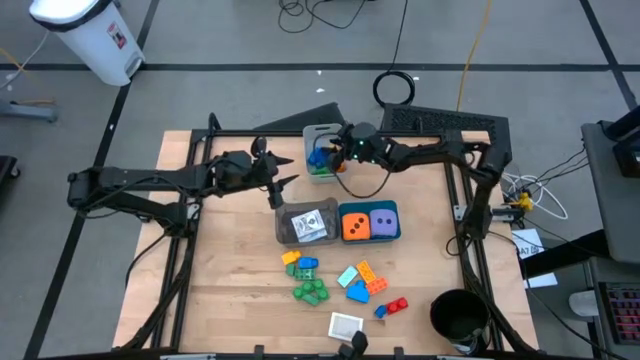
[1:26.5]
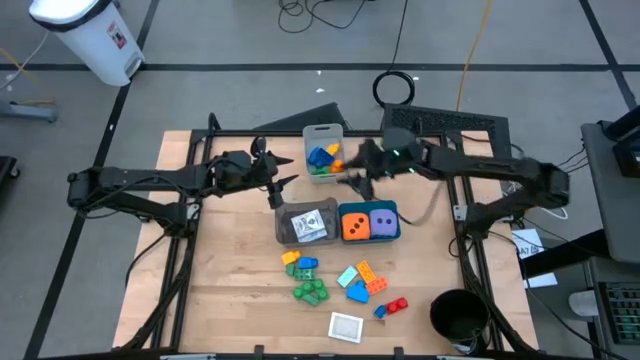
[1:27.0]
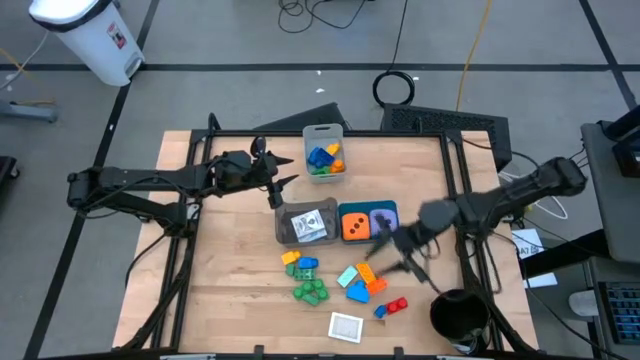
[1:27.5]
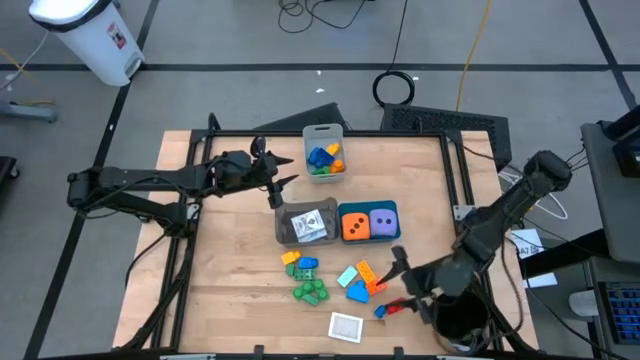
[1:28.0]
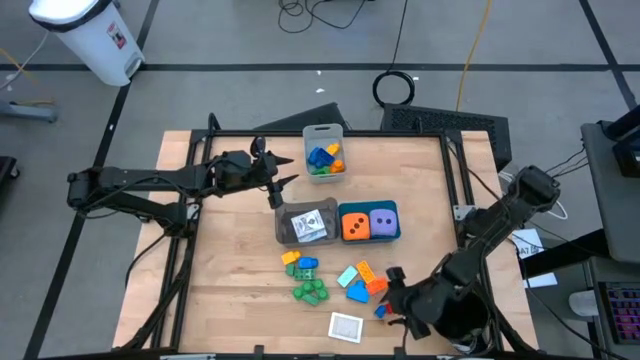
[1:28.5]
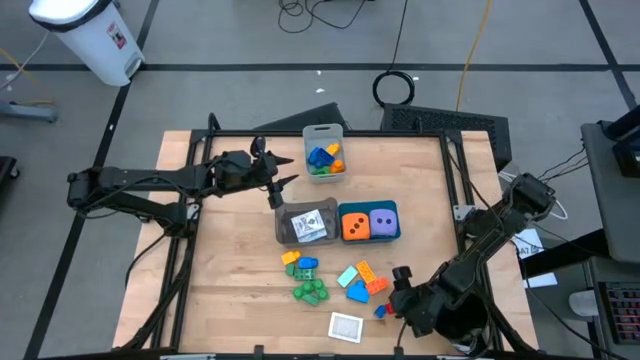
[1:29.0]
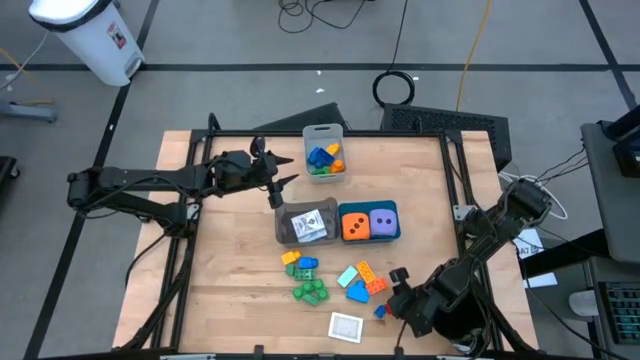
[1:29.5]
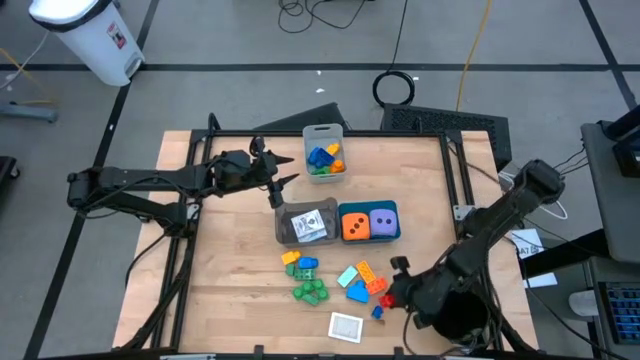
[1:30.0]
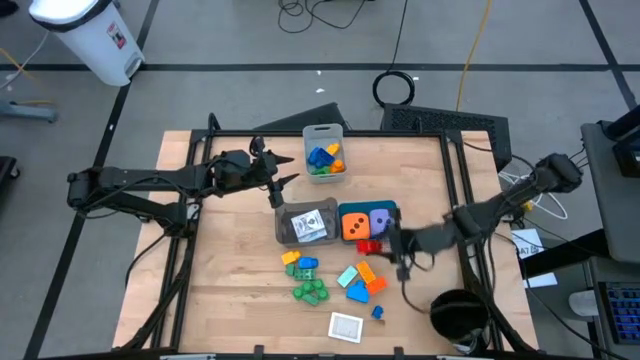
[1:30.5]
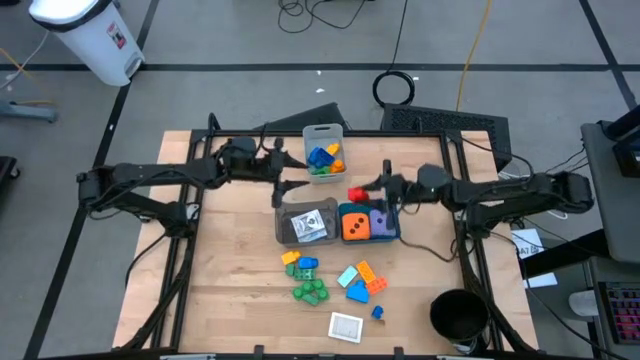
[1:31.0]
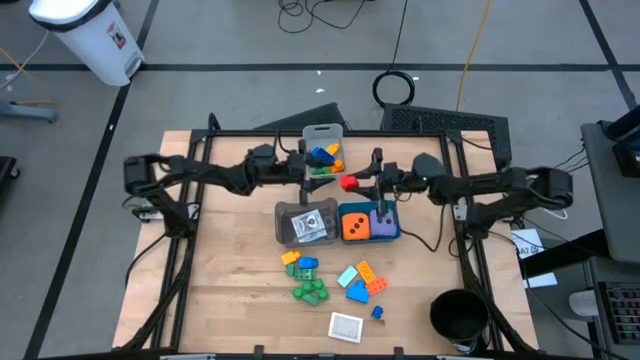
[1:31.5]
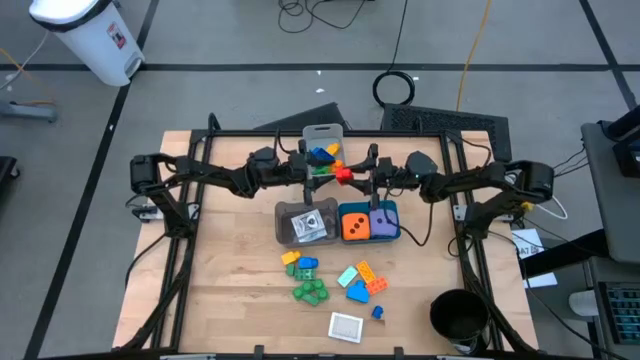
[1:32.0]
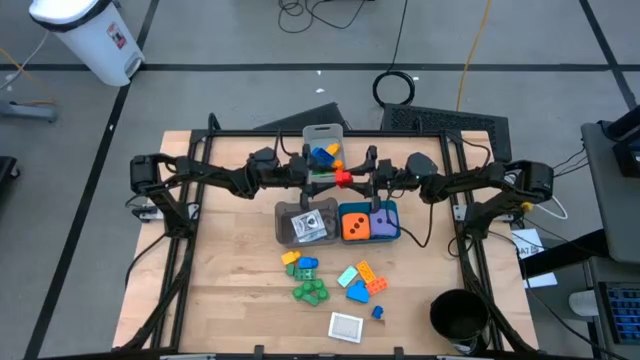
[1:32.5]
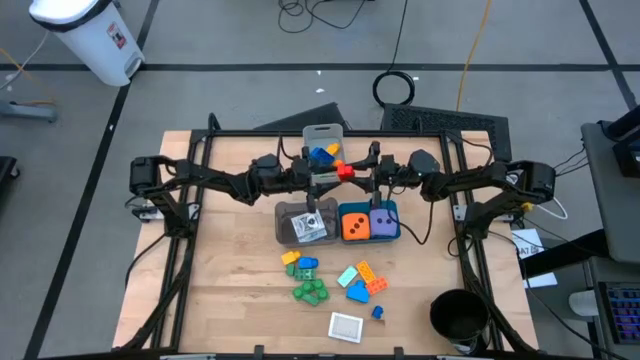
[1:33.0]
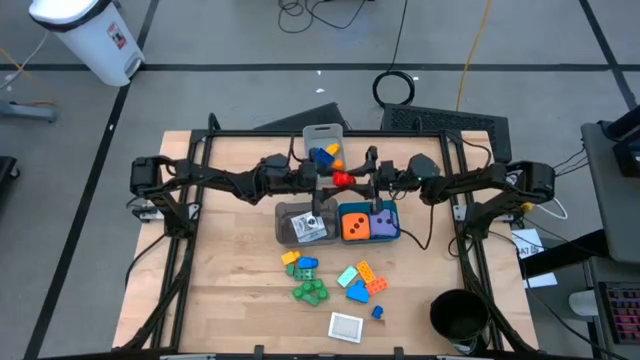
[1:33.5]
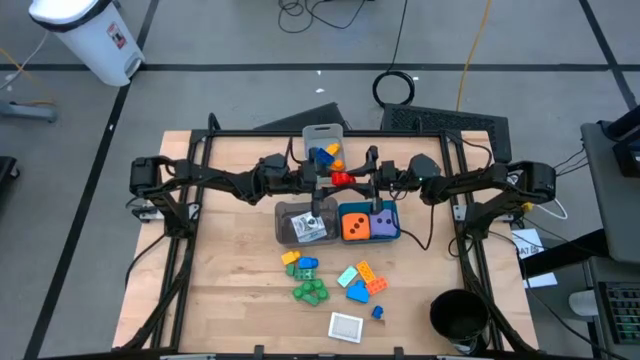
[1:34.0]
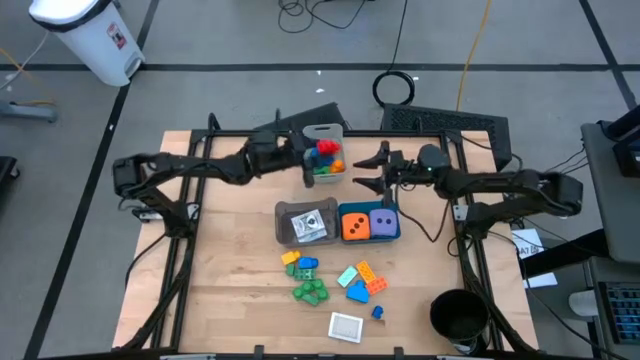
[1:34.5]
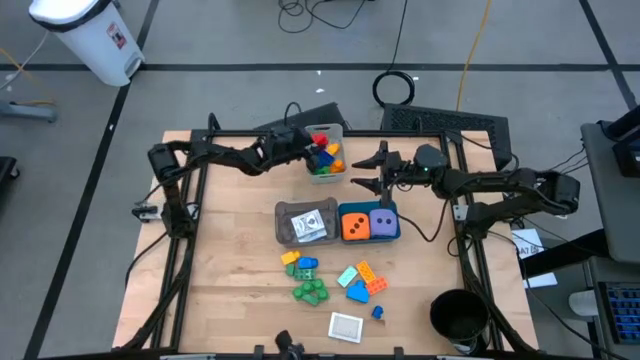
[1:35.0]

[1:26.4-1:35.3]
Task: Pick & Place Toys
Put the red game piece into the gray bin

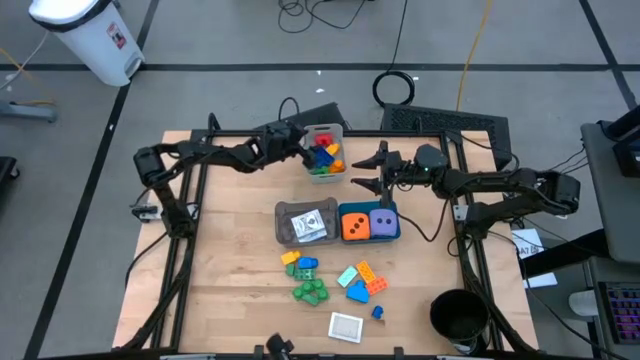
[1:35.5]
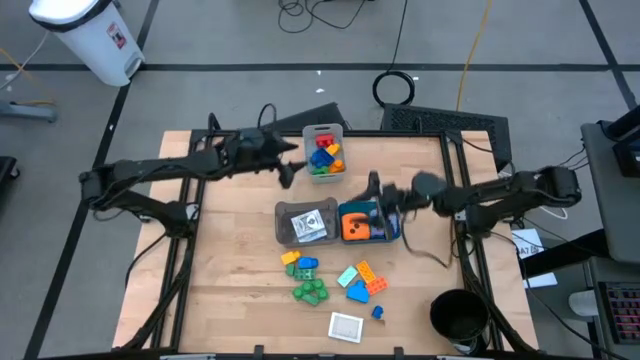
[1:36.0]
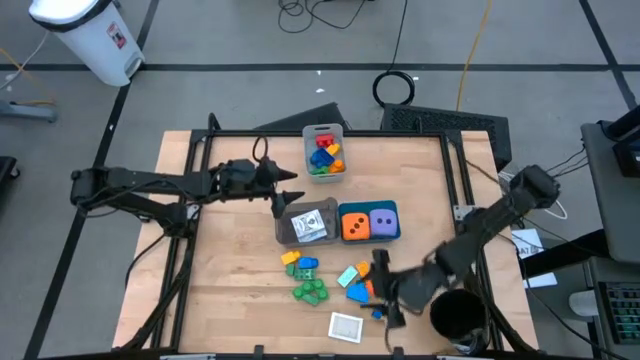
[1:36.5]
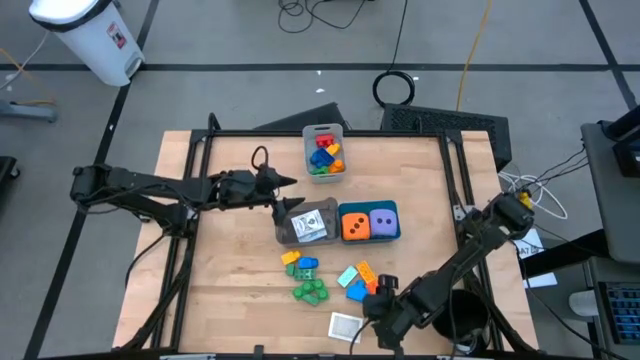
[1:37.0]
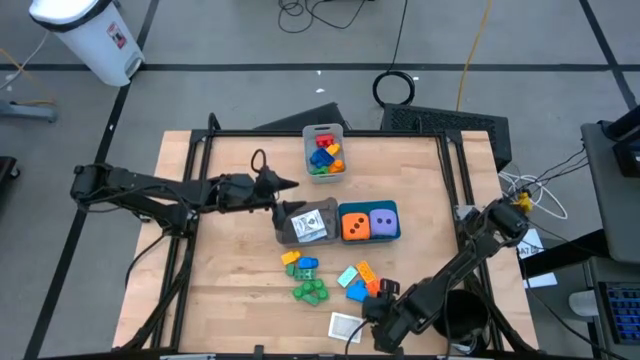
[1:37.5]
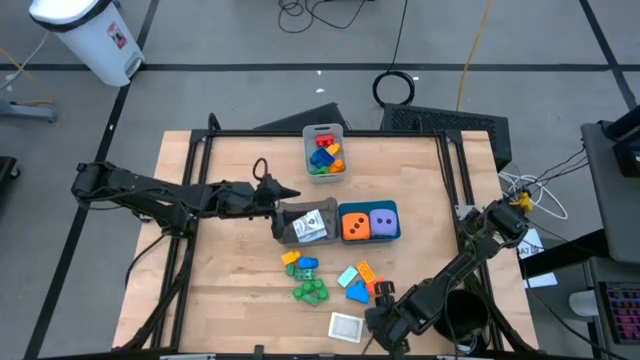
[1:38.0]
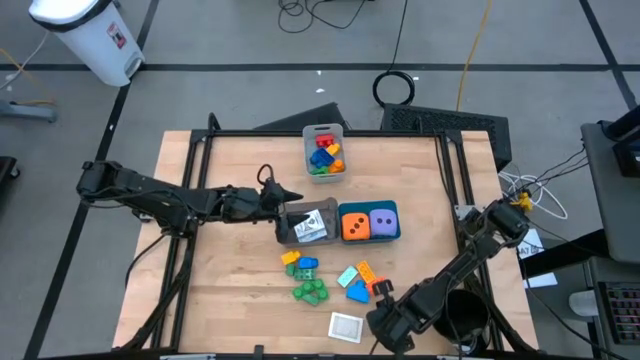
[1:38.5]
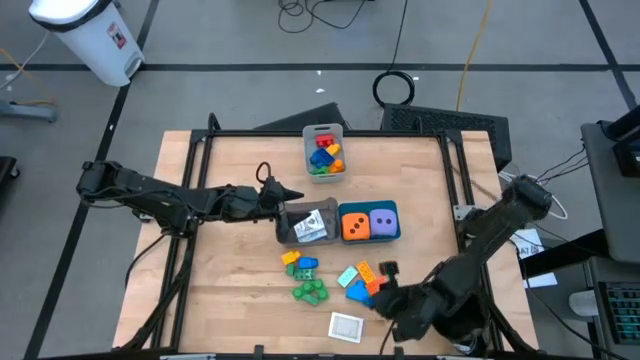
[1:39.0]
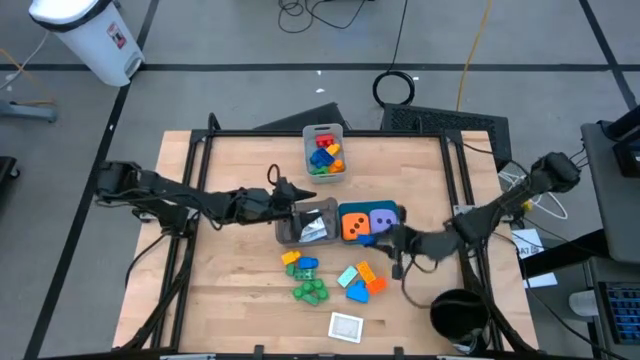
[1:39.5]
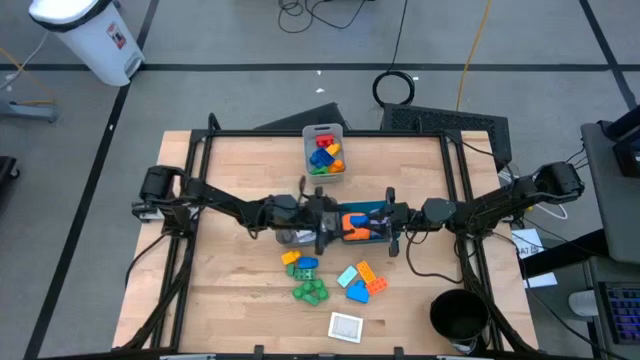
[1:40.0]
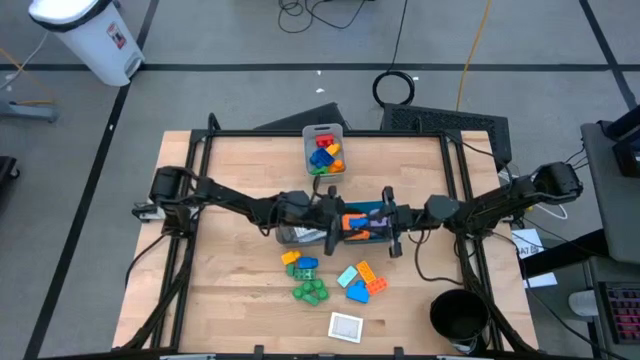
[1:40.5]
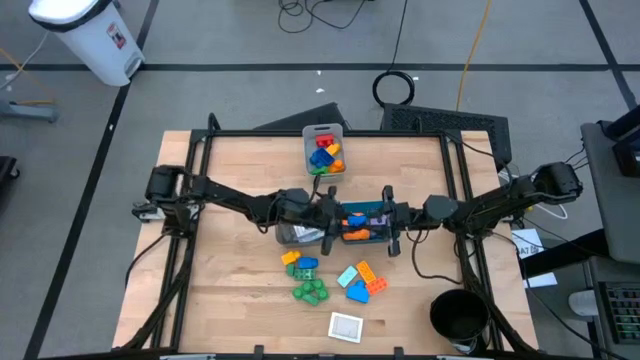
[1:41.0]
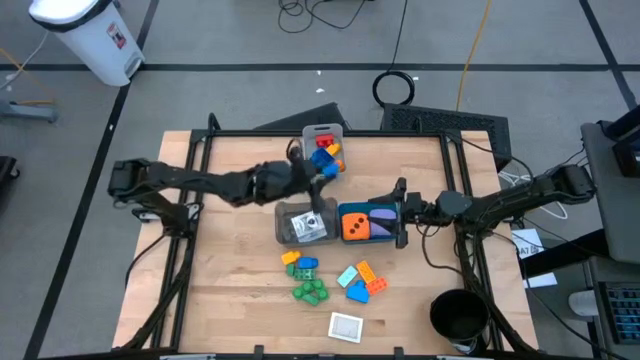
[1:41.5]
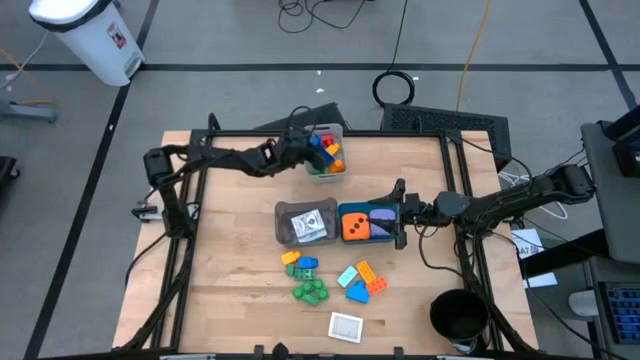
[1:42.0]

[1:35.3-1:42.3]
Put the blue game piece into the gray bin

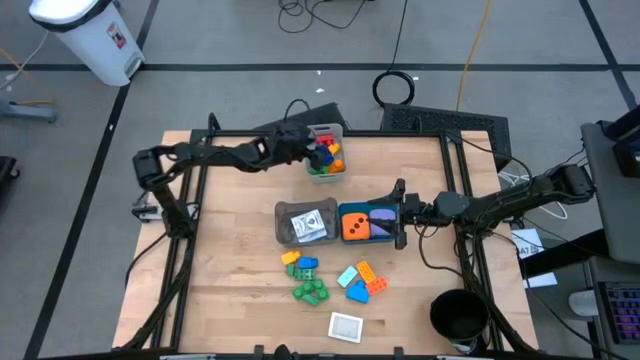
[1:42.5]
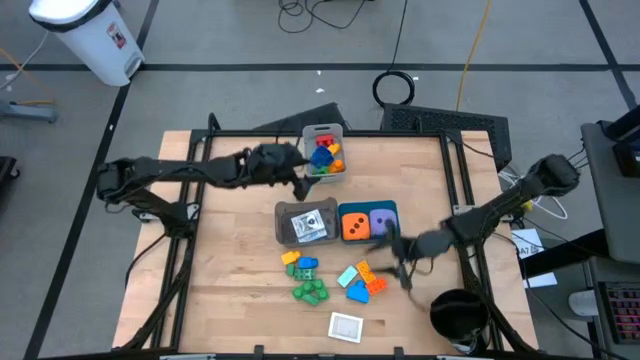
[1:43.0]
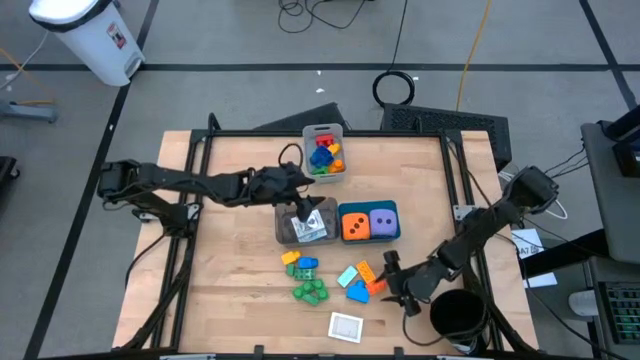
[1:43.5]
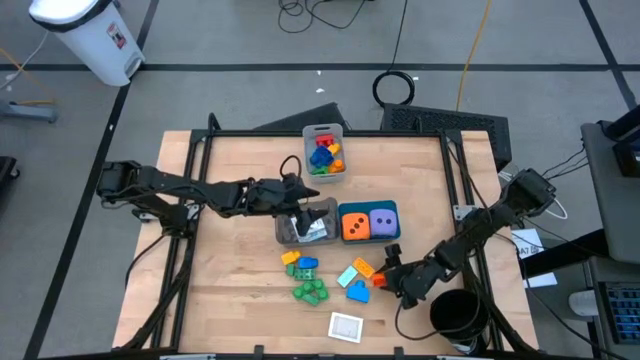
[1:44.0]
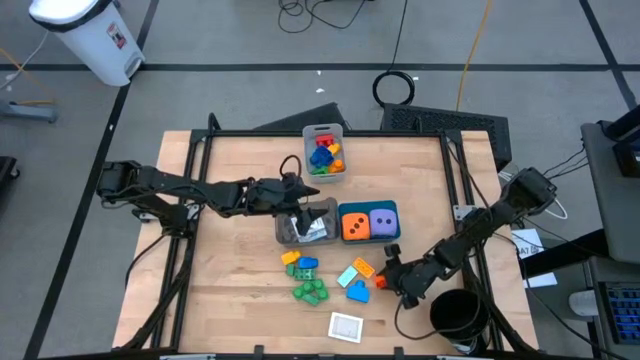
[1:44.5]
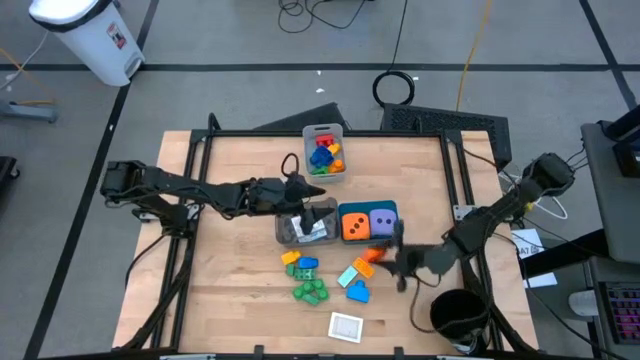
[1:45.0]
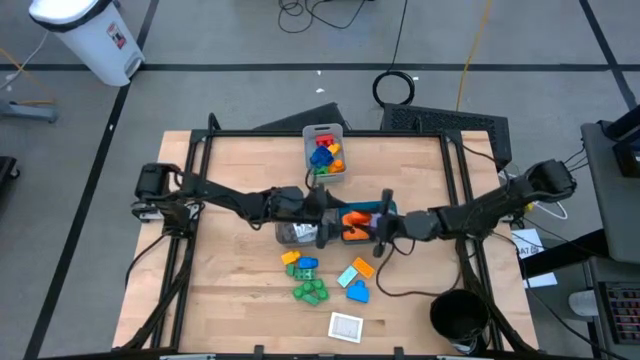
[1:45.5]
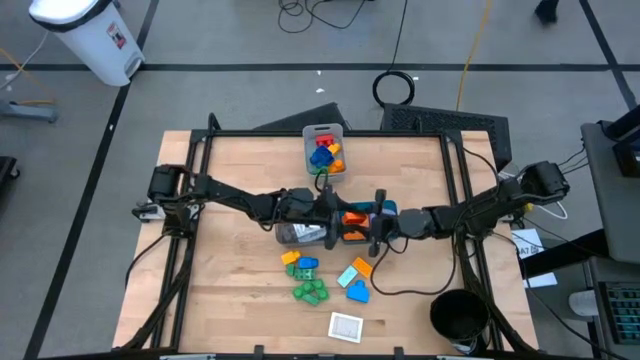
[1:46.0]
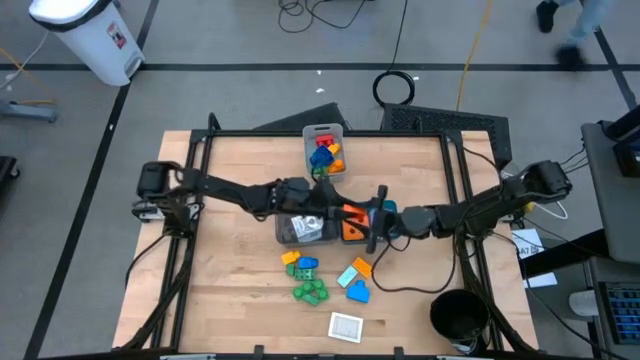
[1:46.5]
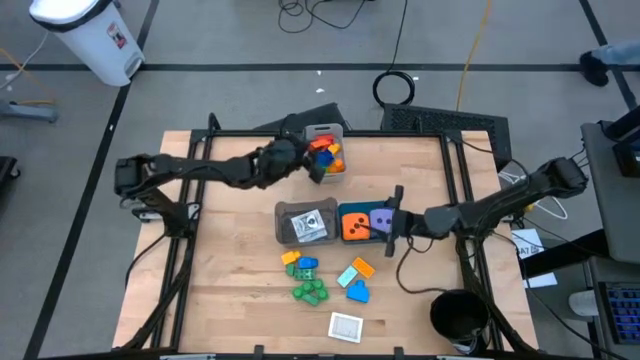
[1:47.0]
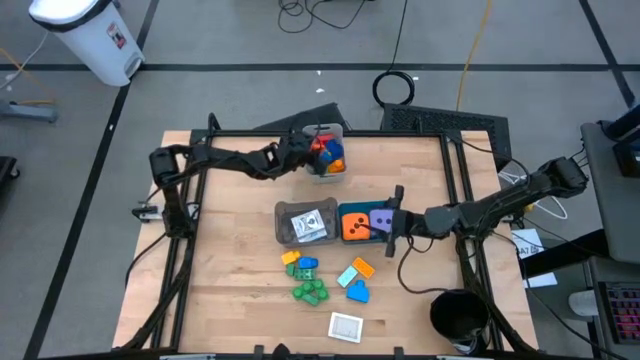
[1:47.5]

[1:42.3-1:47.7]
Put the orange game piece into the gray bin
